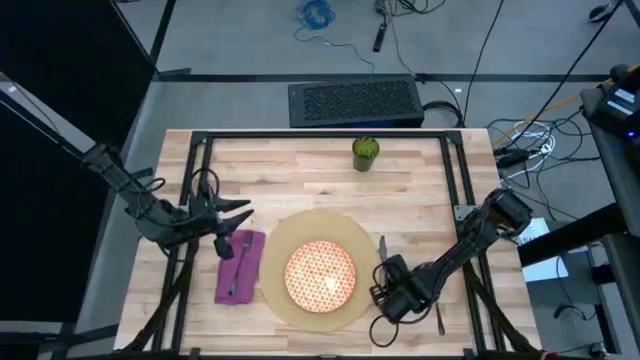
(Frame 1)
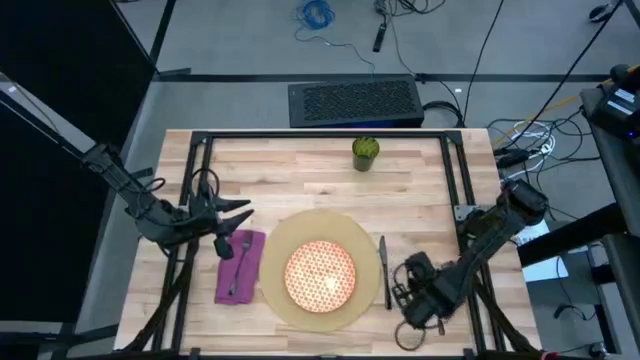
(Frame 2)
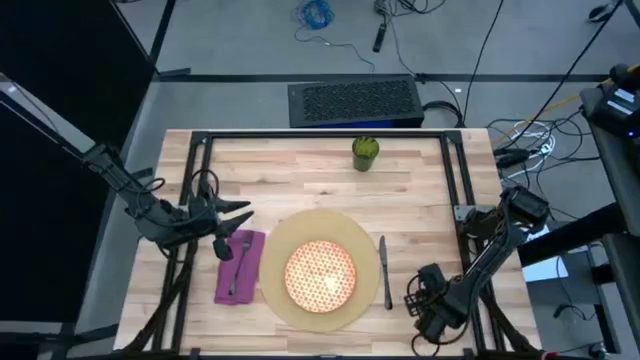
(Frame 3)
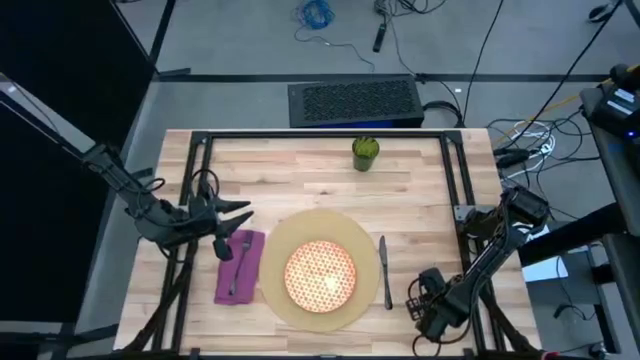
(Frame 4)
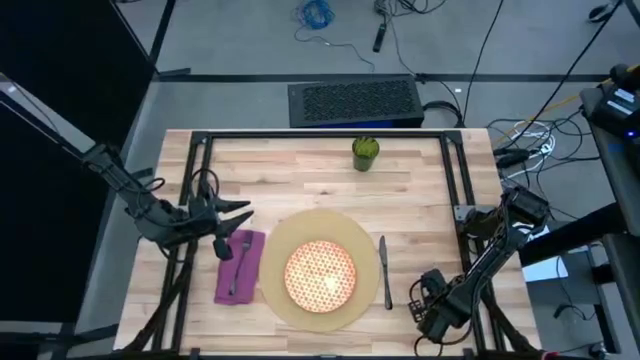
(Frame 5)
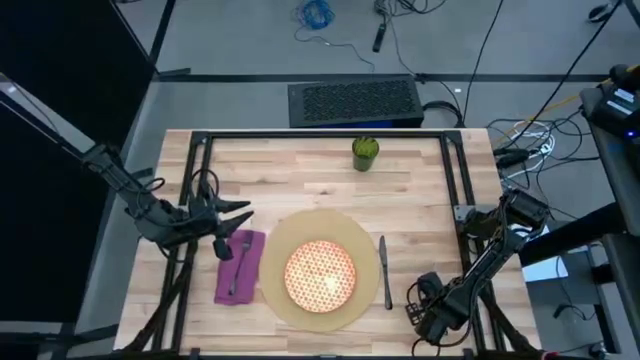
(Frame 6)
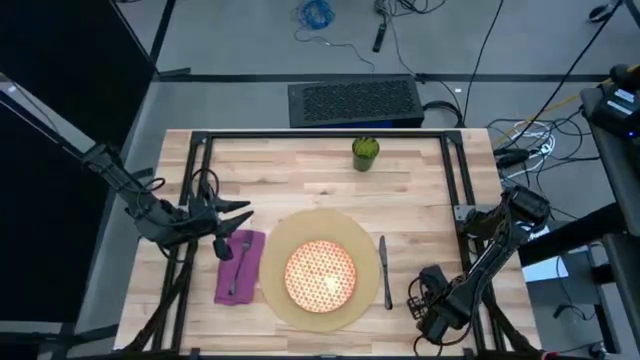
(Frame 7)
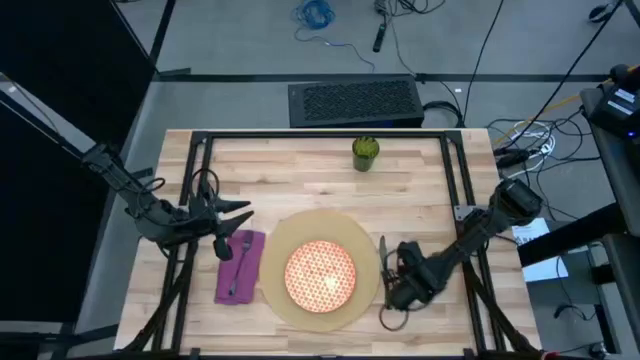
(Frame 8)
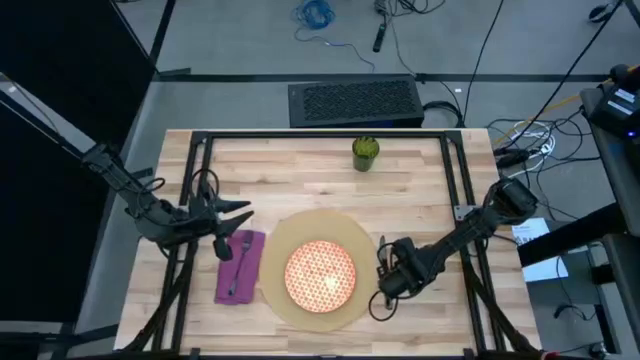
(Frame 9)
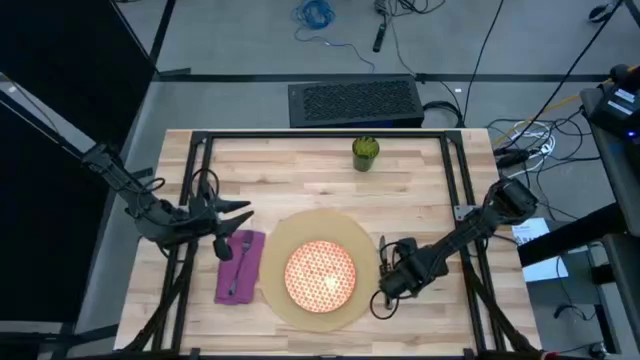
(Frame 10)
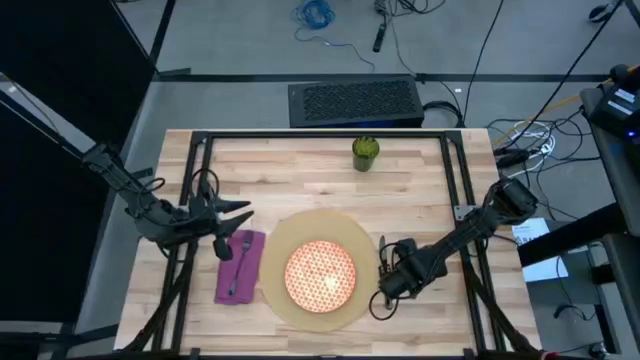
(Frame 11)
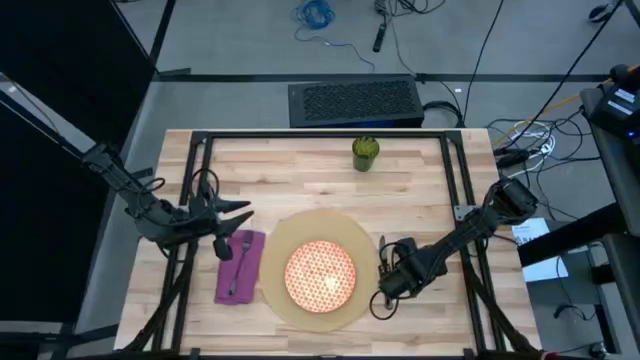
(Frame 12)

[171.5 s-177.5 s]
Task: Set table place
Move the black spoon to the right of the knife

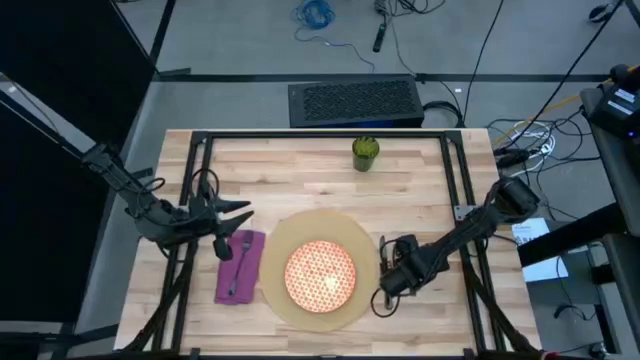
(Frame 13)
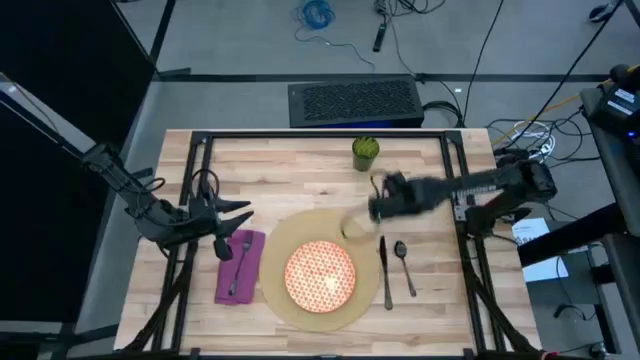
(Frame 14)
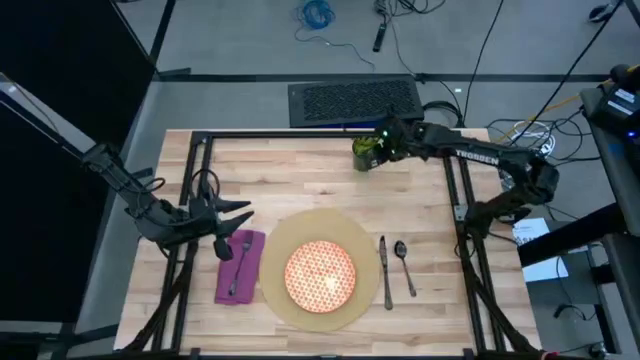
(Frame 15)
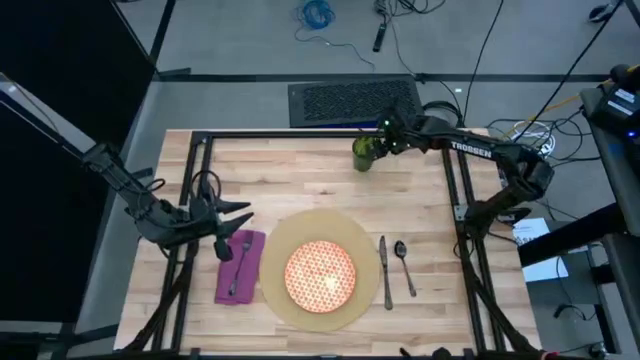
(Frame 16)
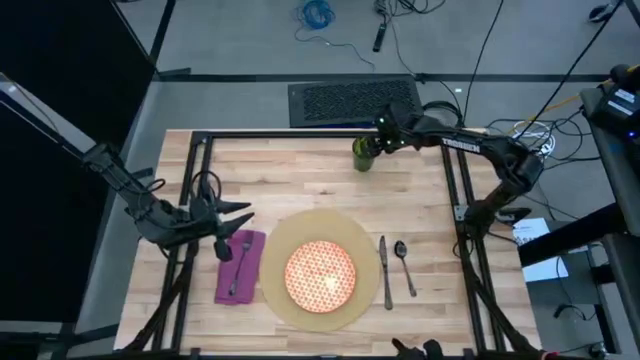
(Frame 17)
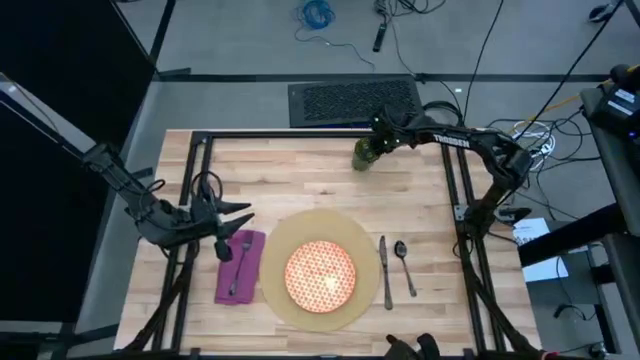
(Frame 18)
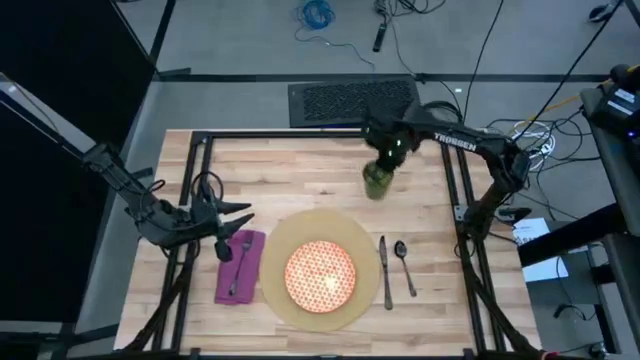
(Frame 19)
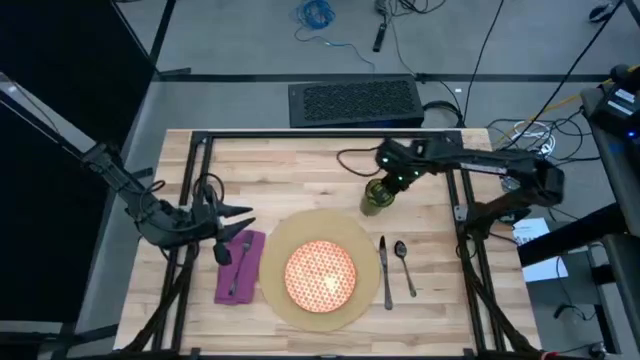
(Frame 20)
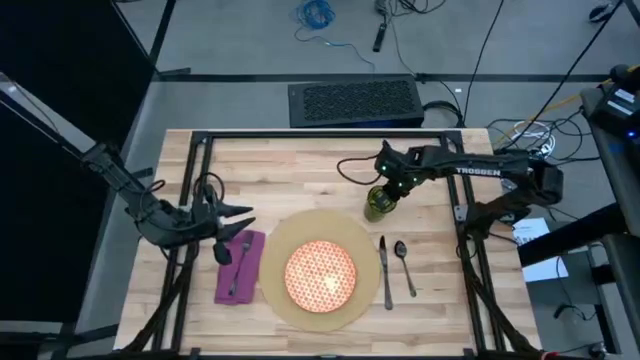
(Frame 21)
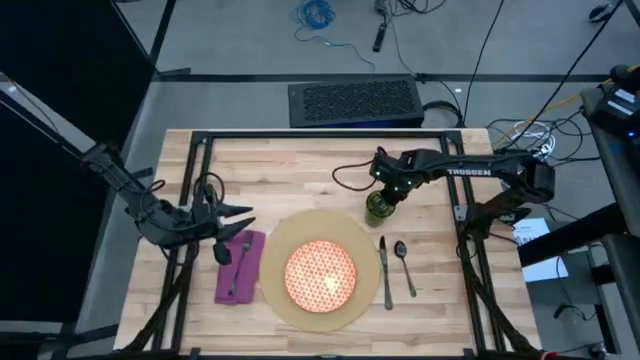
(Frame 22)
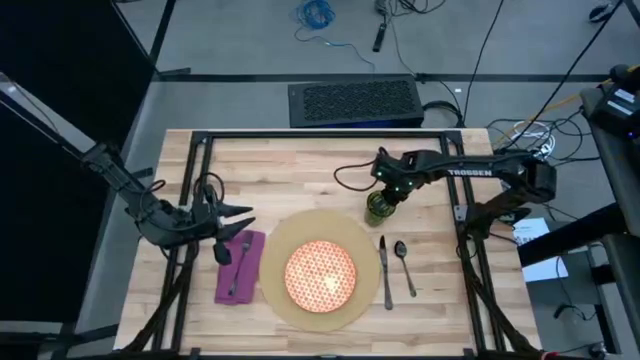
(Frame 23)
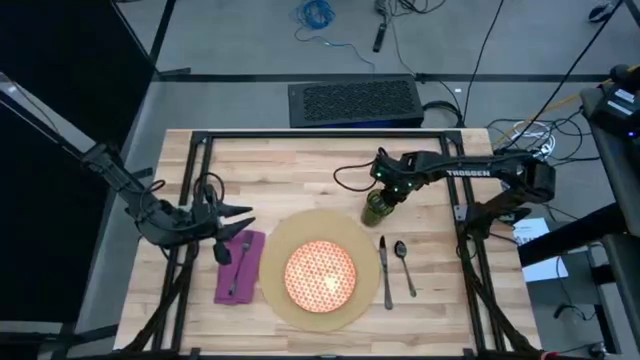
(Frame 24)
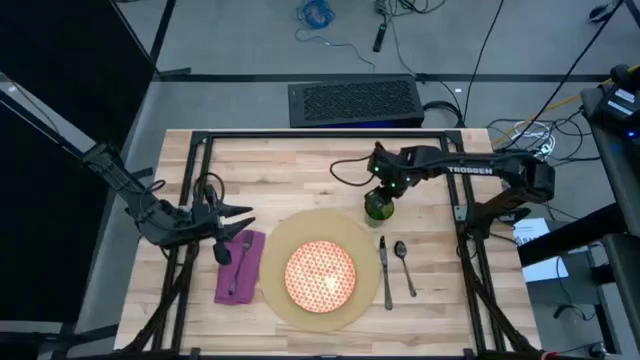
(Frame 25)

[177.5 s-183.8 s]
Move the green cup to the top of the knife

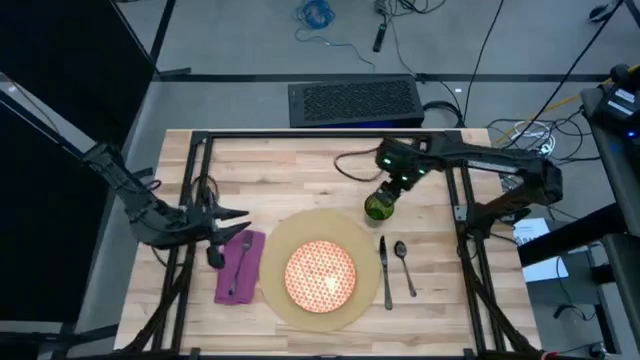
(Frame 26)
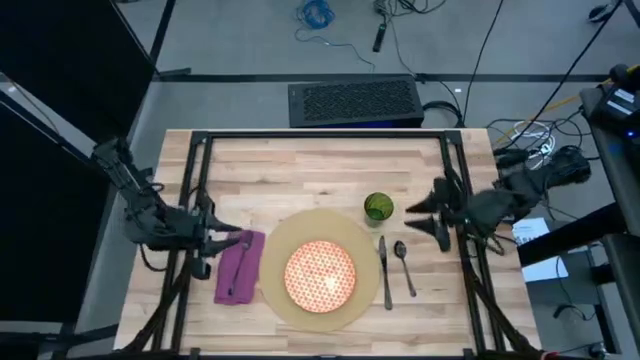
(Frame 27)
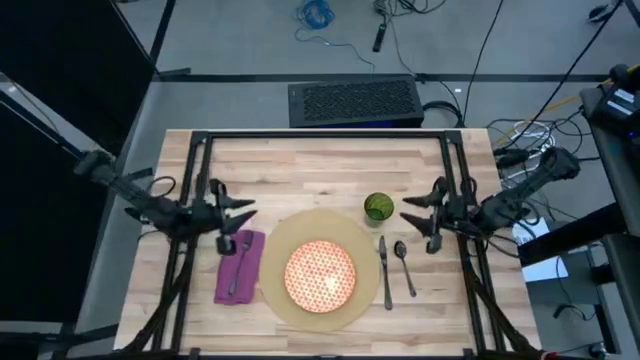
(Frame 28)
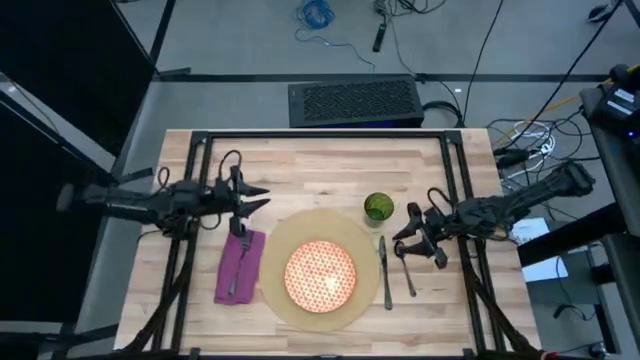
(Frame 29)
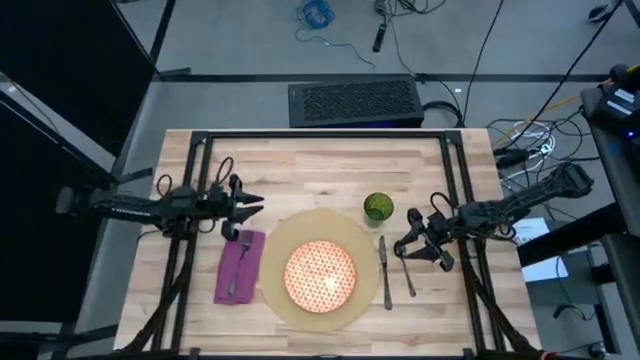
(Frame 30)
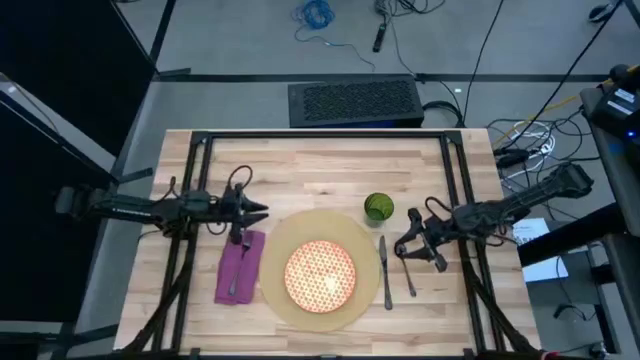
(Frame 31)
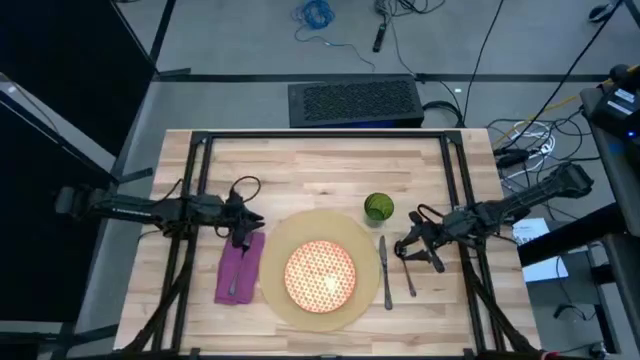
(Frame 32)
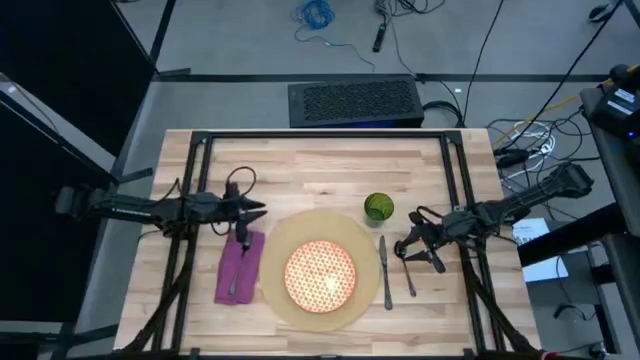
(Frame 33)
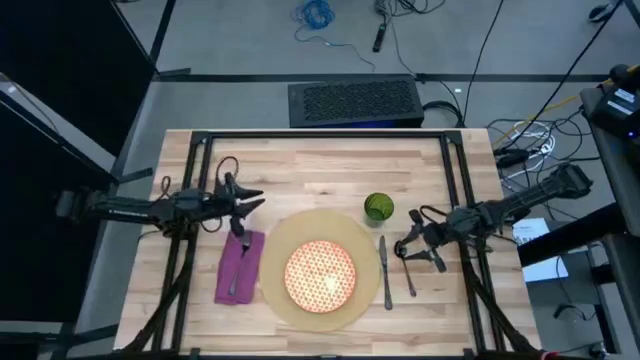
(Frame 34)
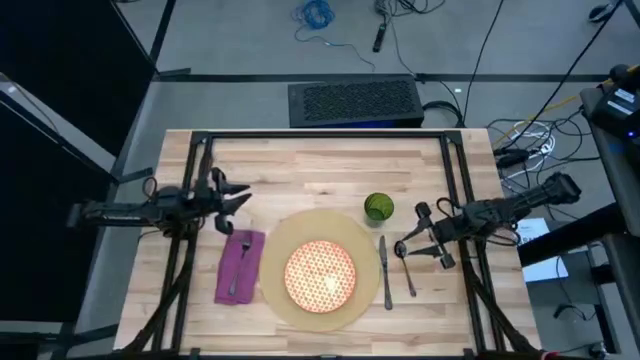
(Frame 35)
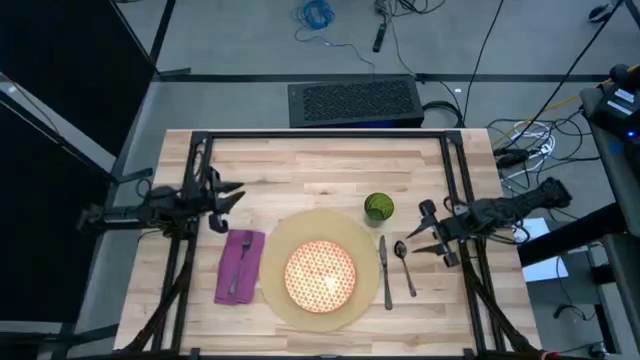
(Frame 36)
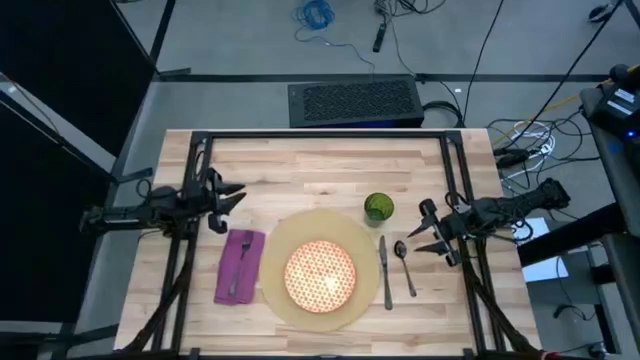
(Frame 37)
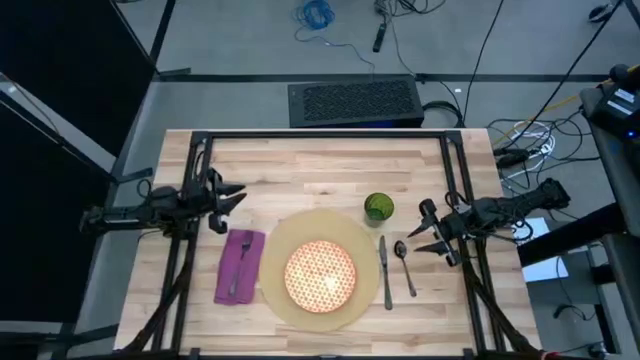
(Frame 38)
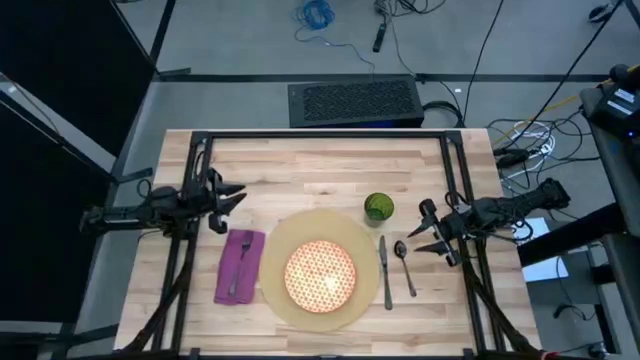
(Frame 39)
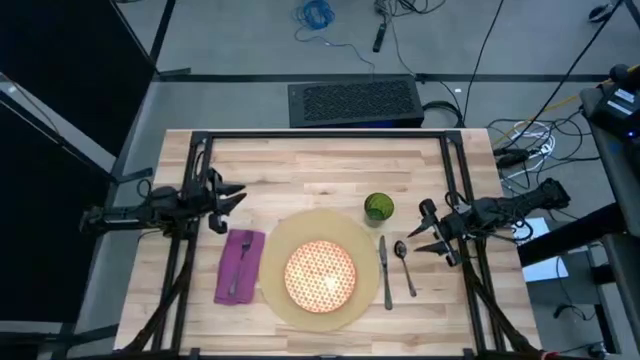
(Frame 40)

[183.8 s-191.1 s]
Return to Home Position

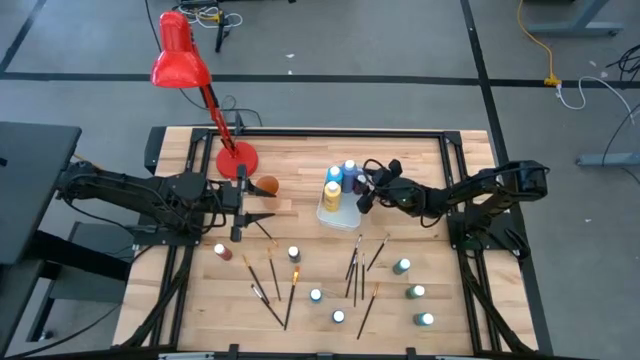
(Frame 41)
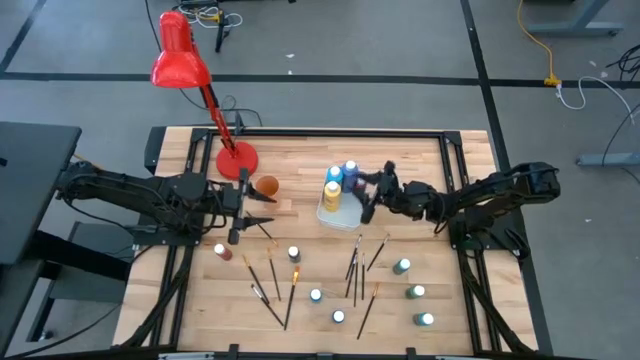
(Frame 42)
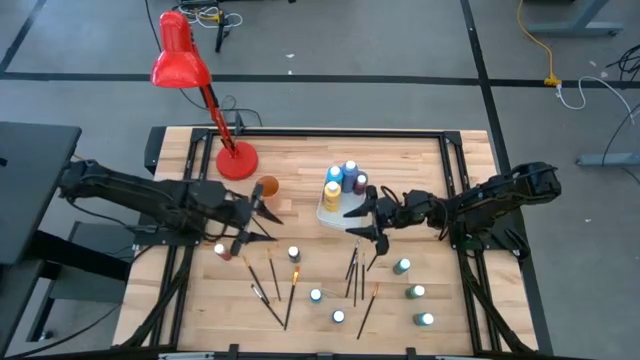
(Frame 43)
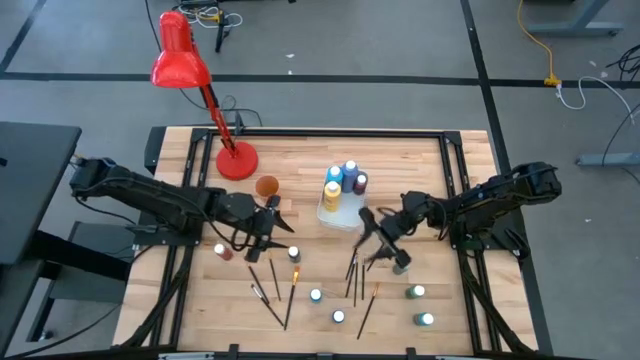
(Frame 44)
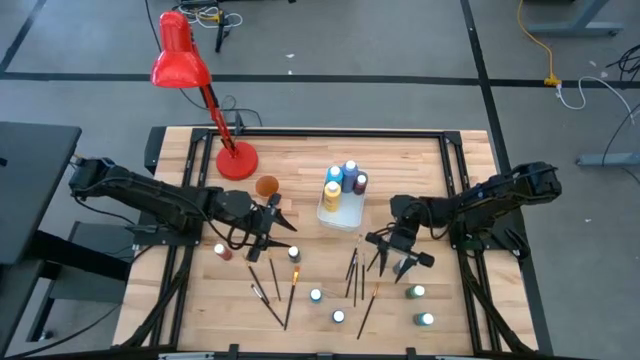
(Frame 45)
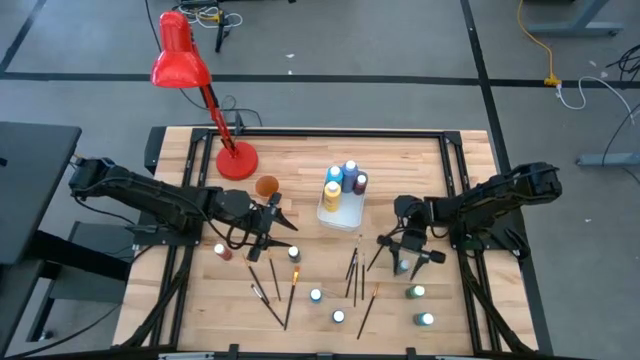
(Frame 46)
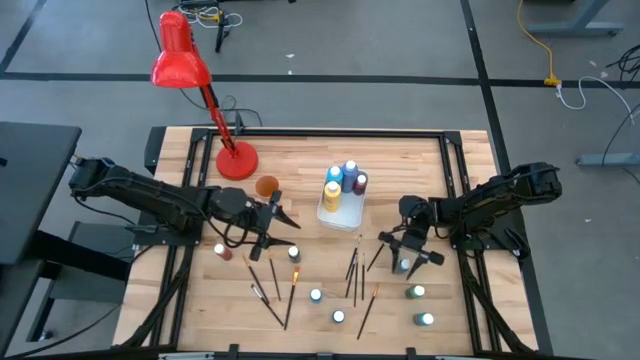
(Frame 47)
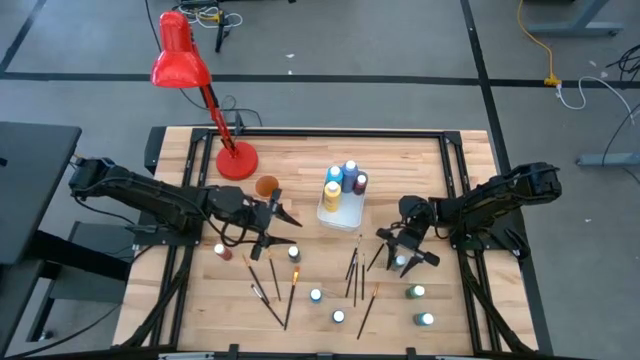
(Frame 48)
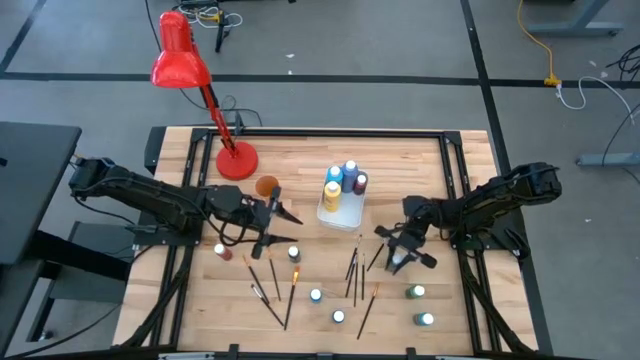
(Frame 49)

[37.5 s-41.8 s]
Task: Pick & Place Paint Supplies
Put the small dark green paint bottle into the white bin
